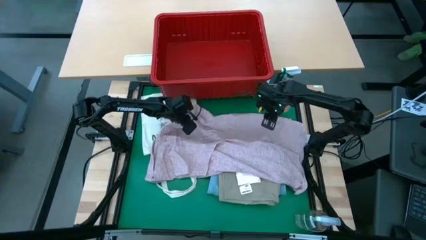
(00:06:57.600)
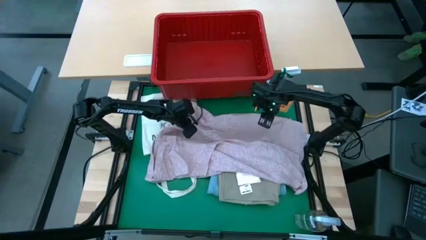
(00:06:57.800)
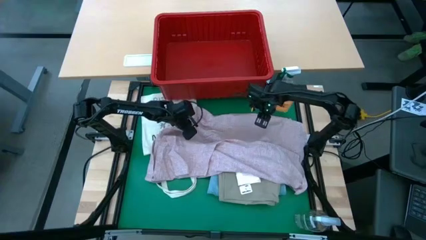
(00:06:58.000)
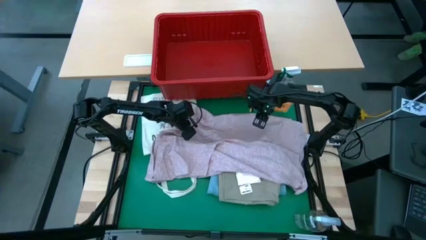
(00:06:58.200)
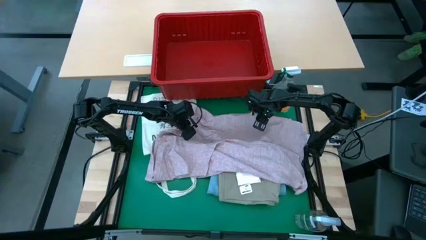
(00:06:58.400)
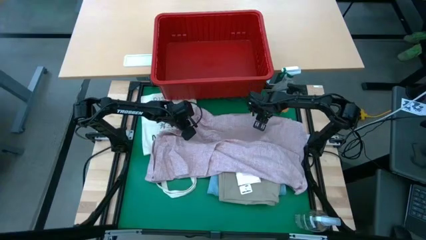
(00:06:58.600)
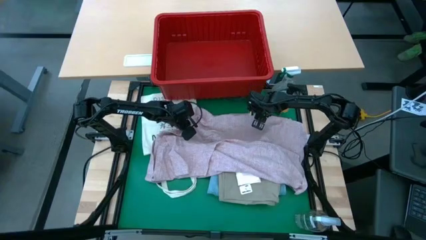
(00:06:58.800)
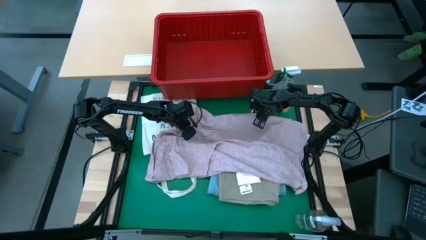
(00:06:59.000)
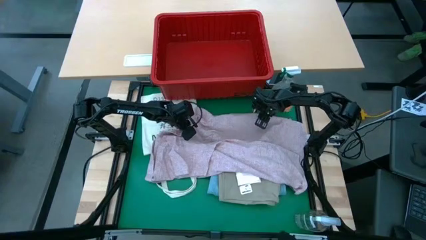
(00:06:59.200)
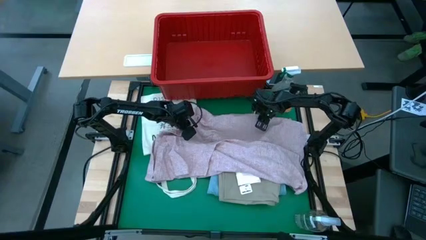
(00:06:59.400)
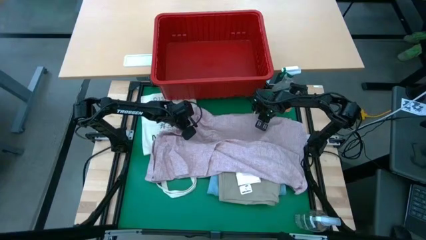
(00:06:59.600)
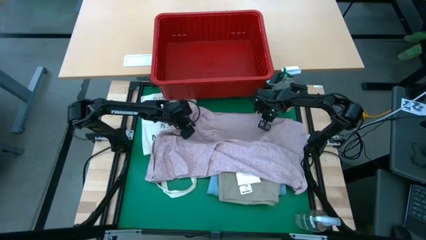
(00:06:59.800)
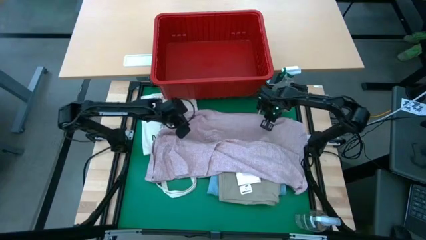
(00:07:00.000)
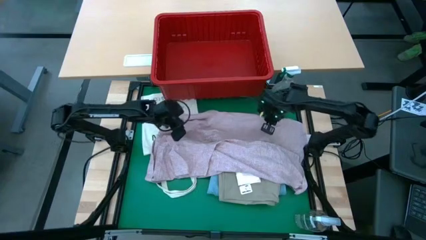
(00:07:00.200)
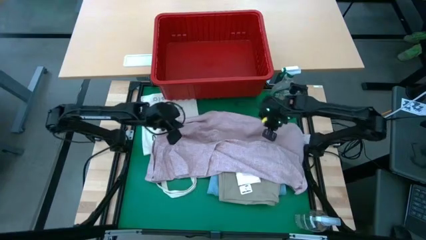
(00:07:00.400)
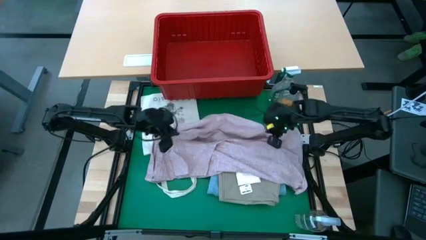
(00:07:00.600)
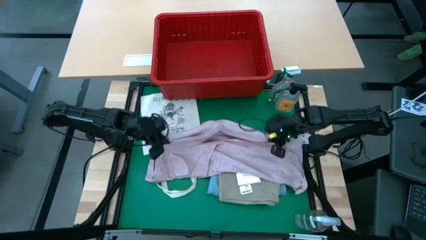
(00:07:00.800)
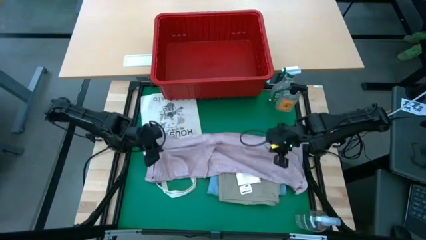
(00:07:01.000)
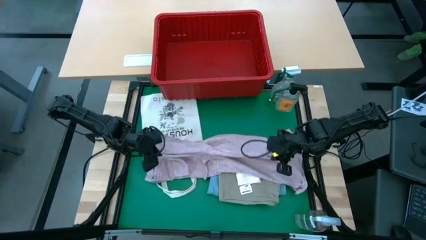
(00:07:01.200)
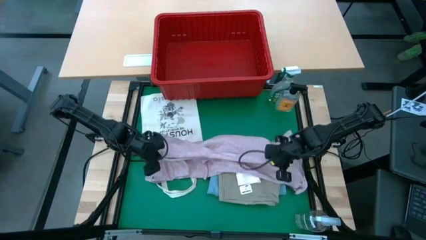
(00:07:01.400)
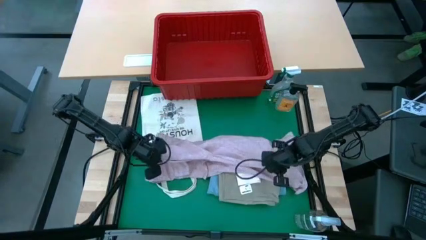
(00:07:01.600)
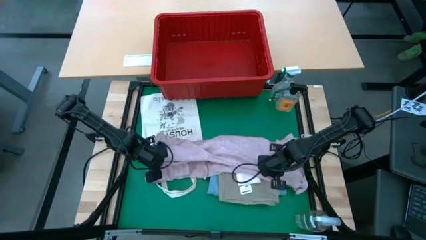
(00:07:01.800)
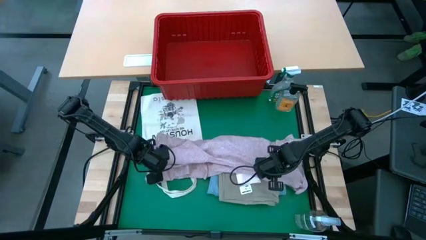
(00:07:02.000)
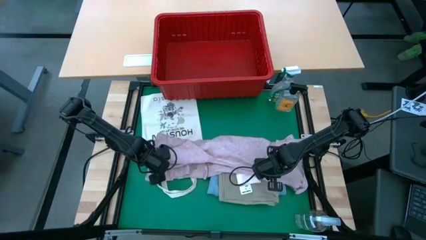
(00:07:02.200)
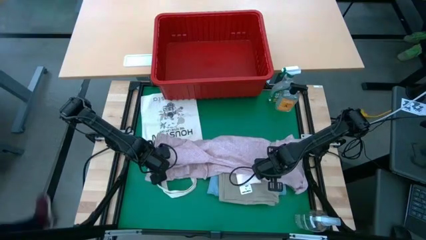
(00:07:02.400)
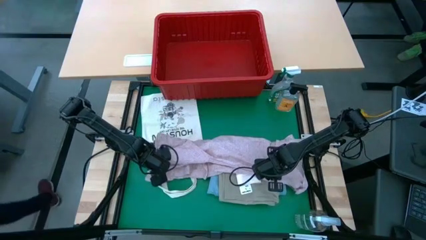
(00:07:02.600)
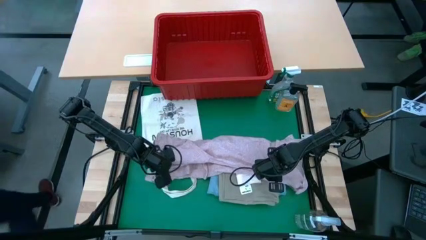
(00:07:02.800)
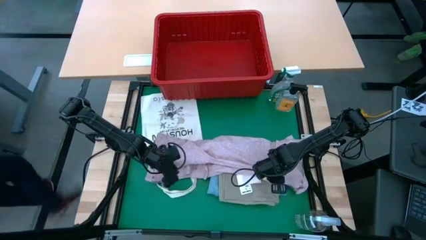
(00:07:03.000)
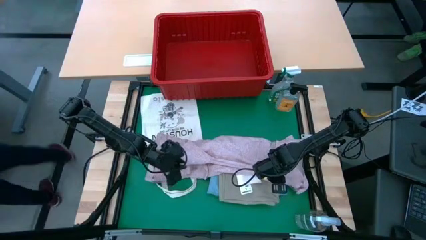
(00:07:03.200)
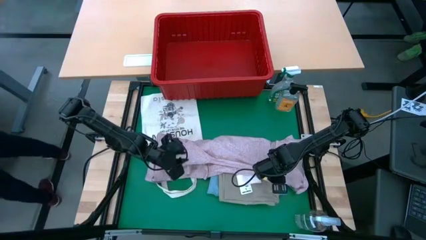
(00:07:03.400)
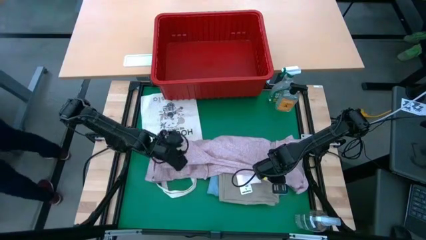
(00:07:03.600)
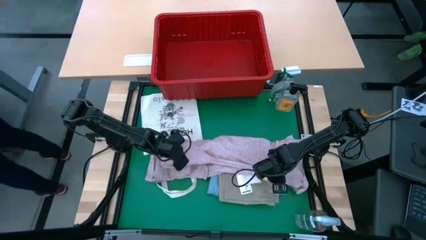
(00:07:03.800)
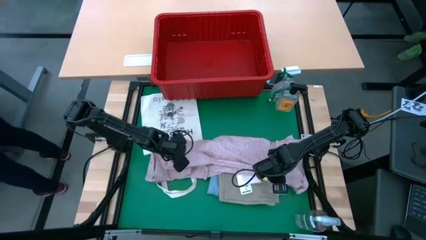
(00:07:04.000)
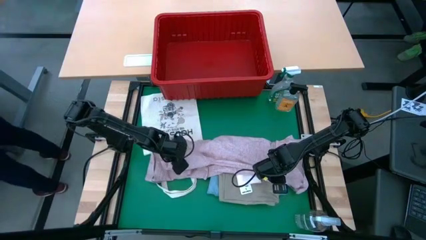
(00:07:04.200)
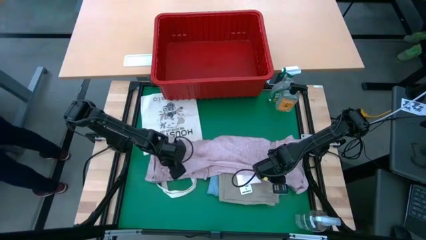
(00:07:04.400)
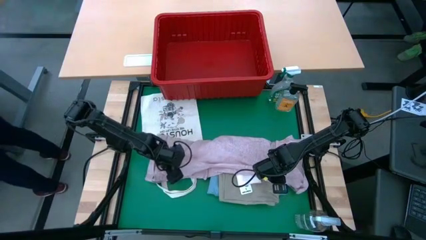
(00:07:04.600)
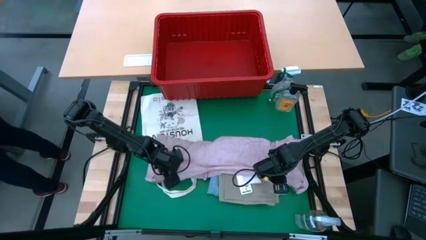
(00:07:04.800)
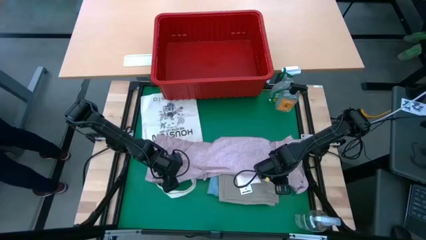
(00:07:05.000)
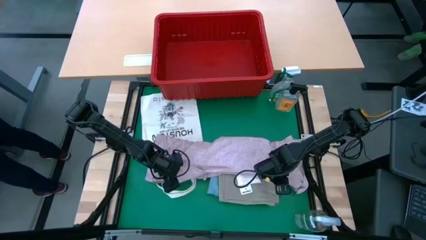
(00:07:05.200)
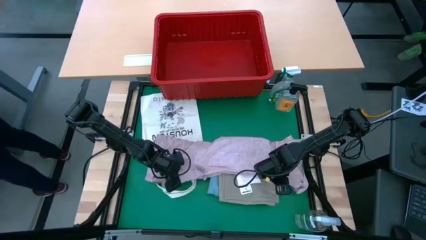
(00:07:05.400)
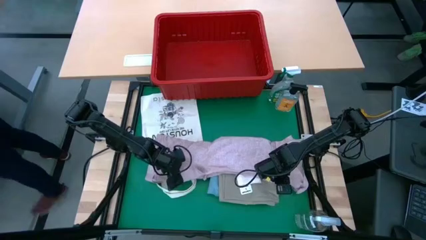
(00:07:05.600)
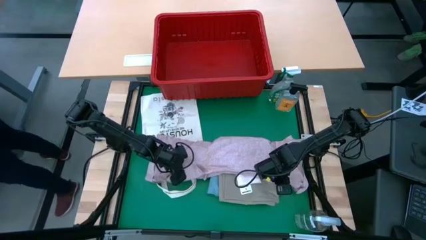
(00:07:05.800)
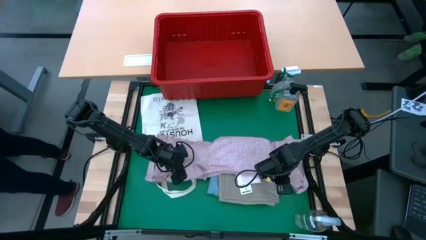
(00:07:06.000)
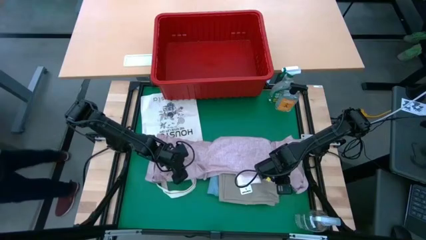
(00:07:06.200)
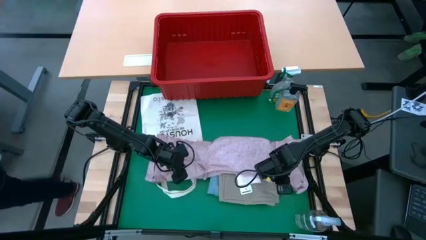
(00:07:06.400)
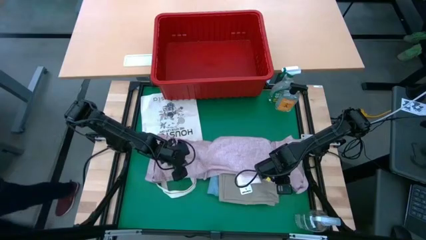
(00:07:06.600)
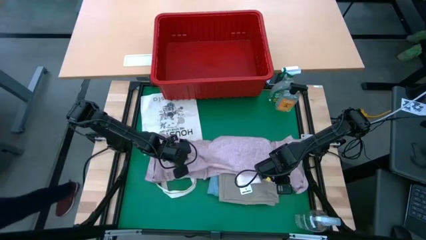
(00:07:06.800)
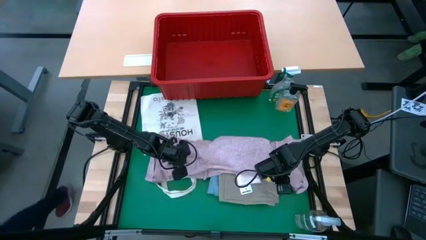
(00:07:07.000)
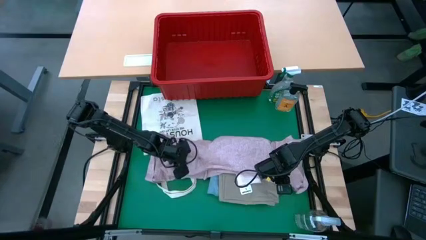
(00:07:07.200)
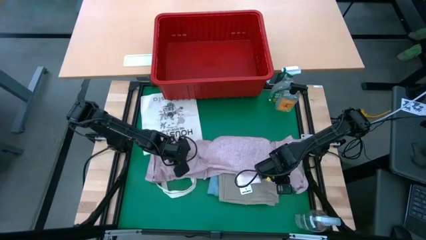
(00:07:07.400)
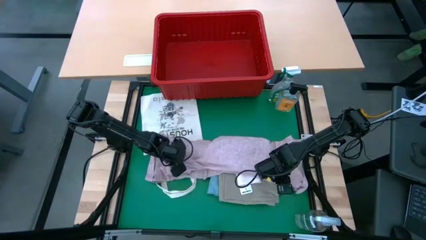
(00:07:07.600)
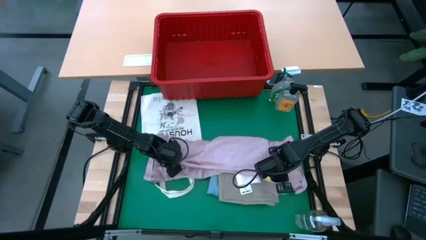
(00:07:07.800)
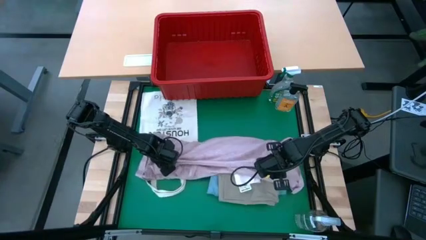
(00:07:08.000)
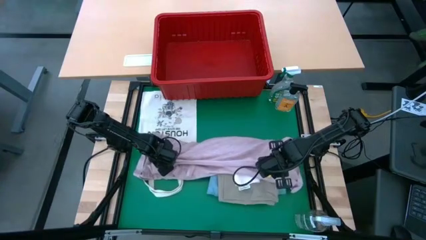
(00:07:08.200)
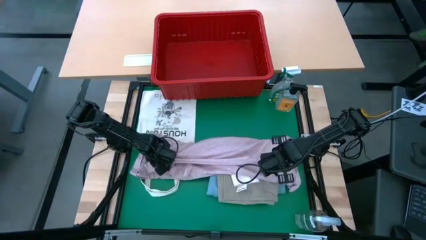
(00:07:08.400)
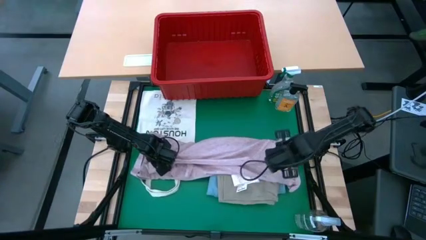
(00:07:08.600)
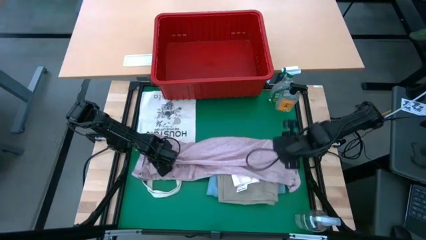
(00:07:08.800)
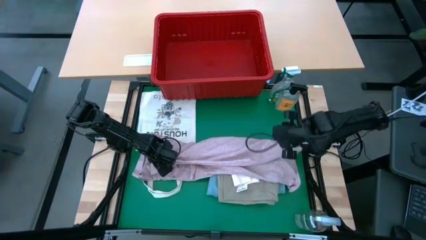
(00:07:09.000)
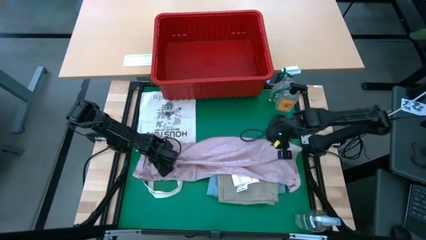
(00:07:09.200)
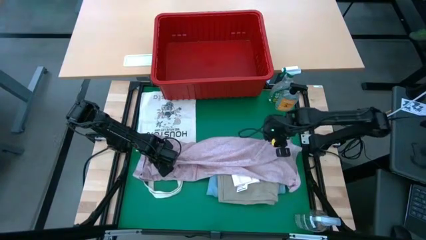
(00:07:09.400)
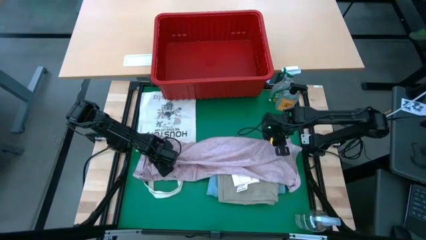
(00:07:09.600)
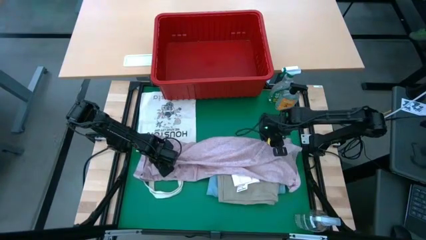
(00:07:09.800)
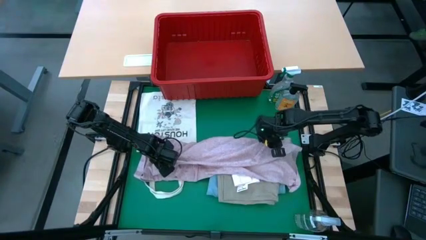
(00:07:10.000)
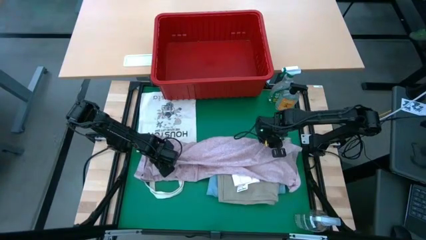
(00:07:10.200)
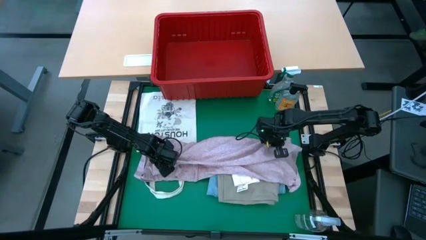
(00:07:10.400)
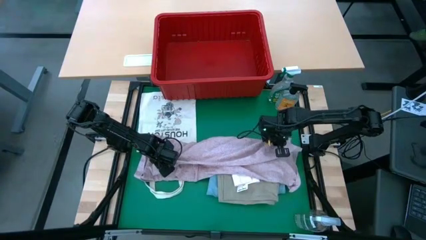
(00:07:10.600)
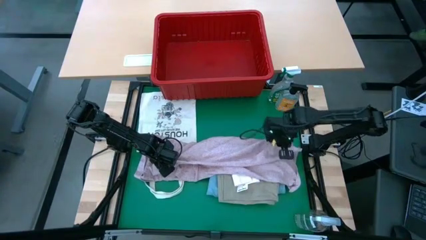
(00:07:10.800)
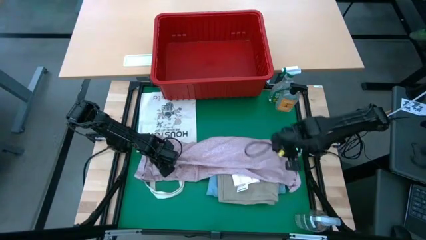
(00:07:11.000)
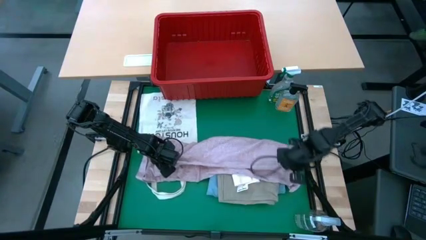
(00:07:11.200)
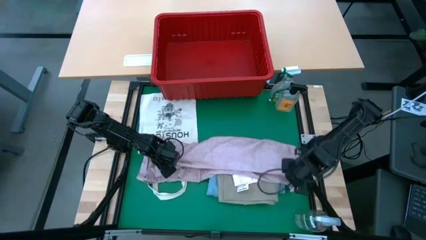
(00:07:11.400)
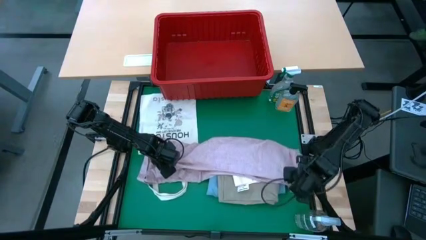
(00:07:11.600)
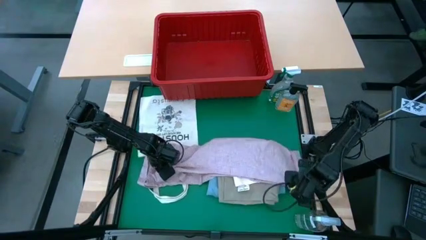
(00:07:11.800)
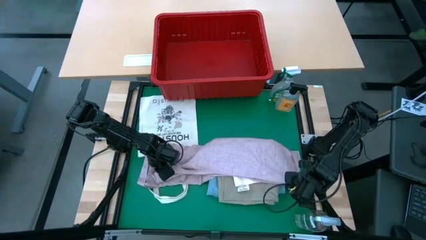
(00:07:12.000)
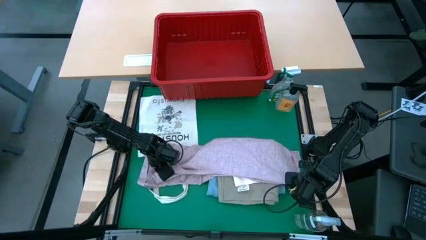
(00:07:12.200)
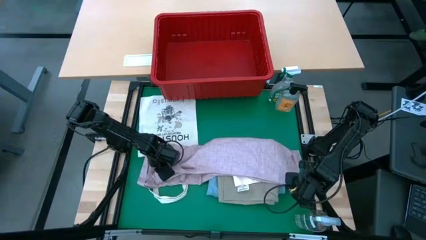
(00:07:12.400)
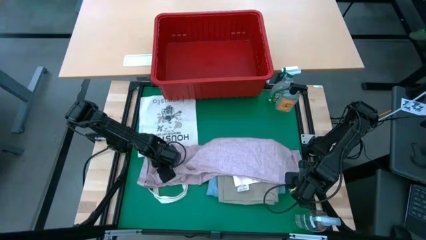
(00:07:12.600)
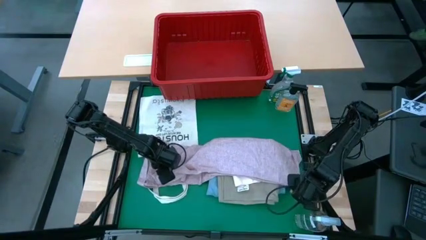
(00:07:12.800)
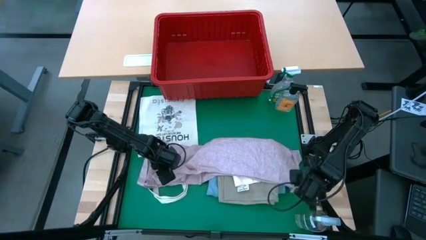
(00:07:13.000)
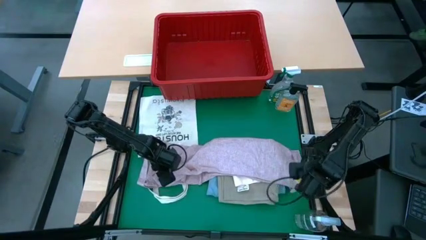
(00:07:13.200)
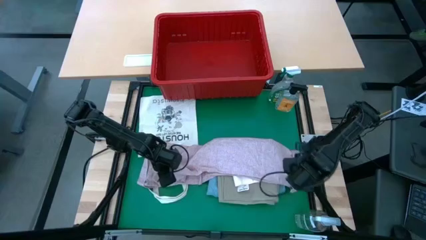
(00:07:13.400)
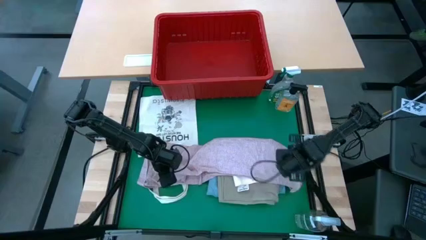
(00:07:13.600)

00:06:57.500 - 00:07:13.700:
Task: Fold laundry
Fold the pink polo
